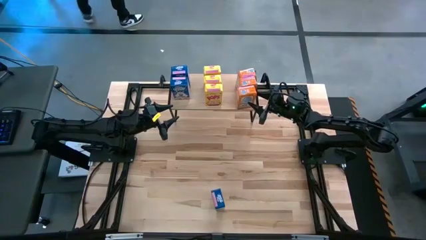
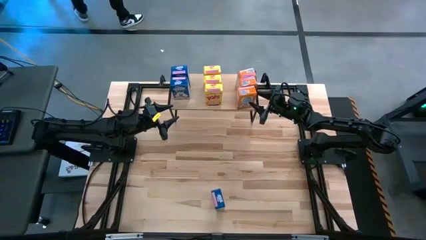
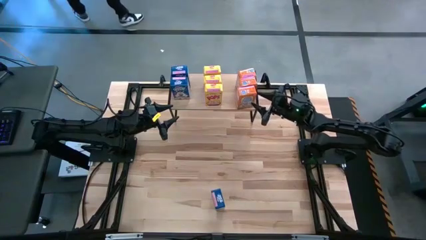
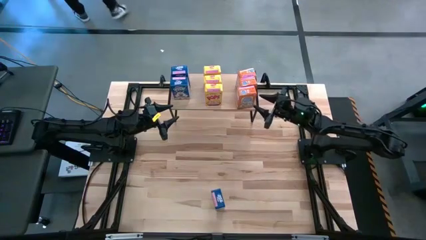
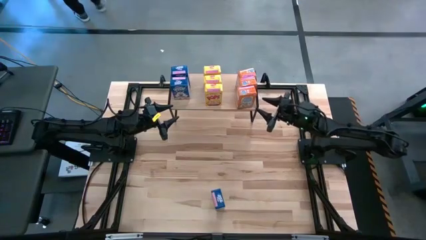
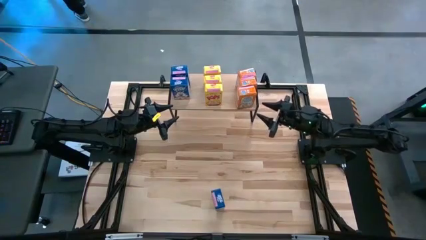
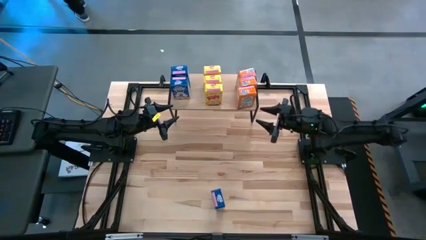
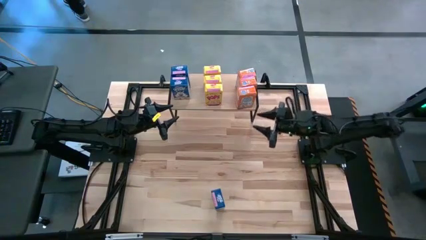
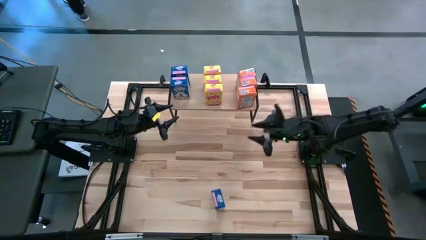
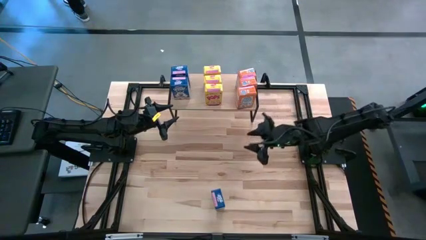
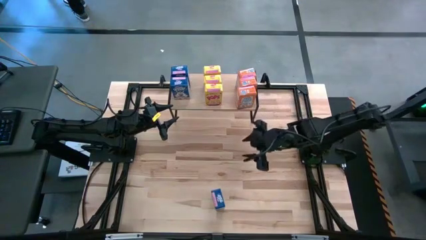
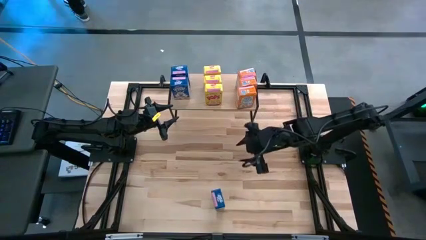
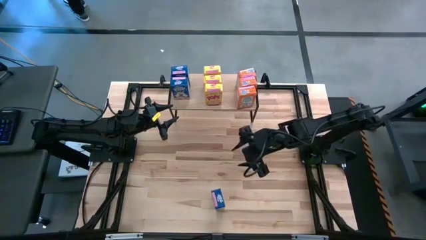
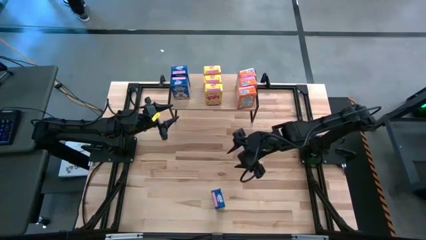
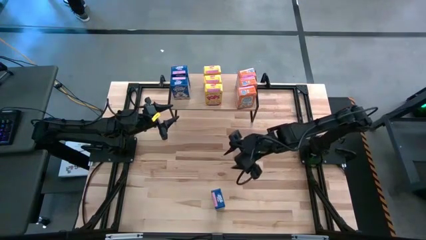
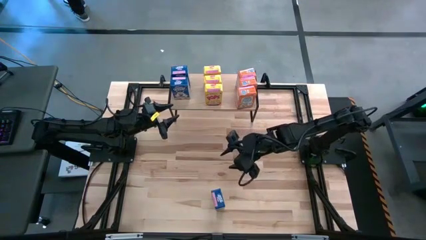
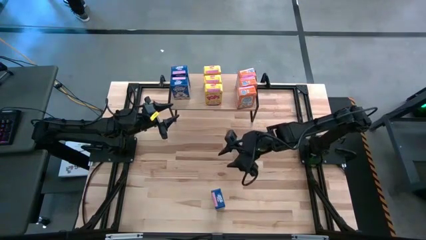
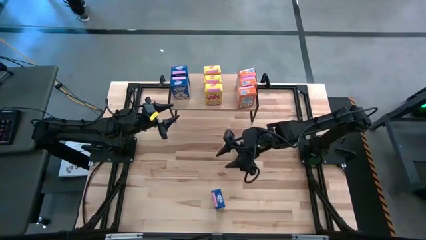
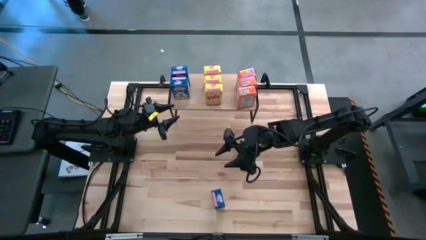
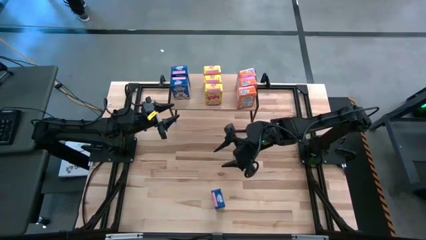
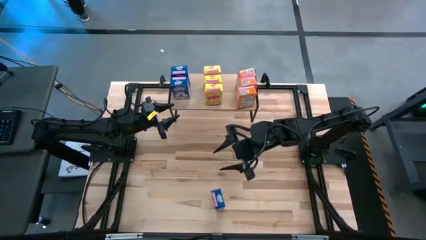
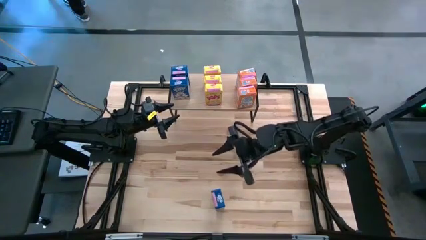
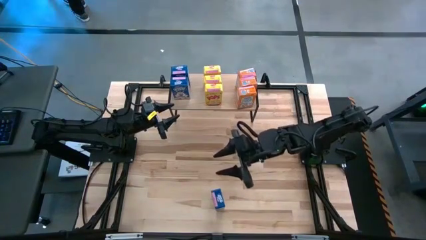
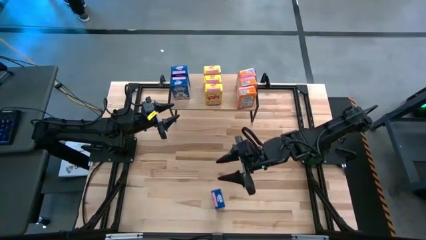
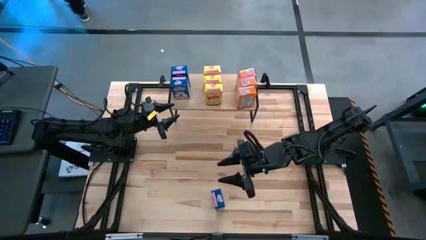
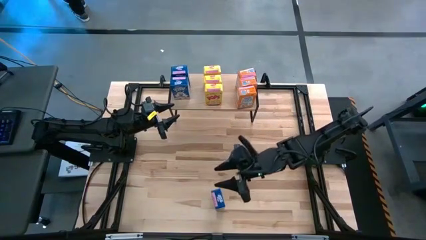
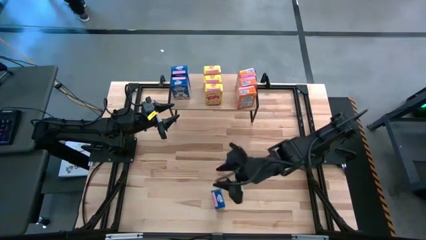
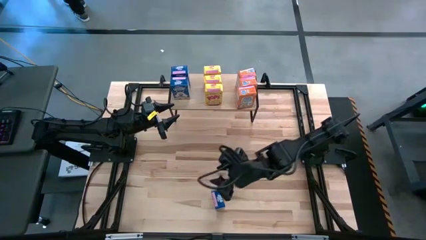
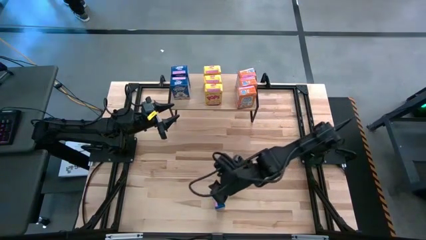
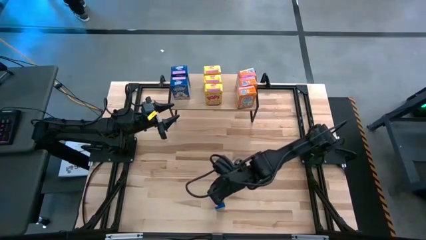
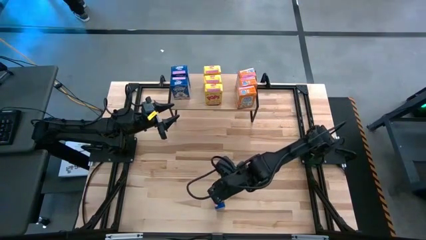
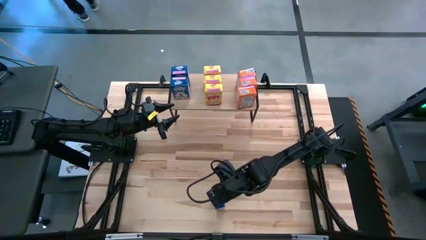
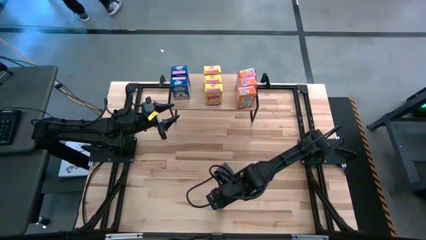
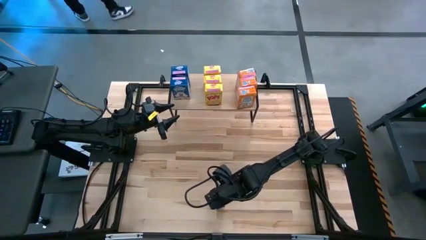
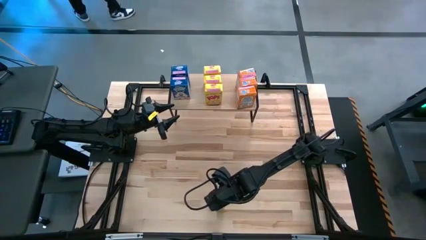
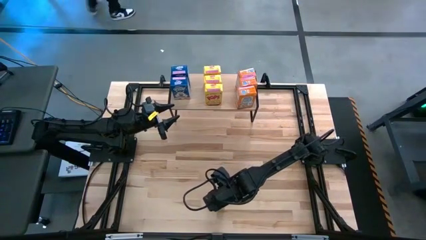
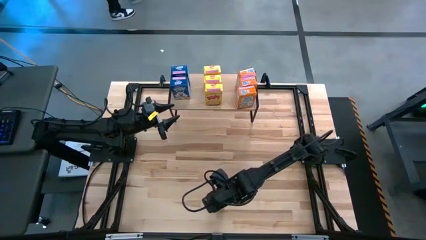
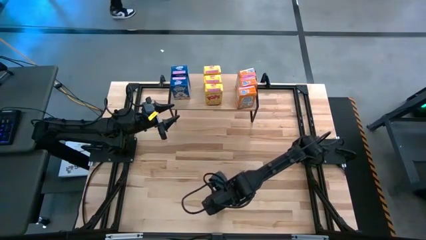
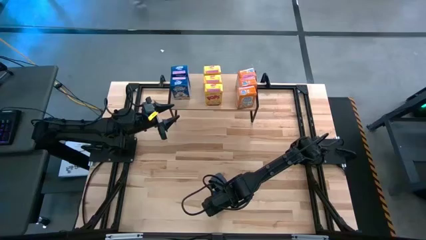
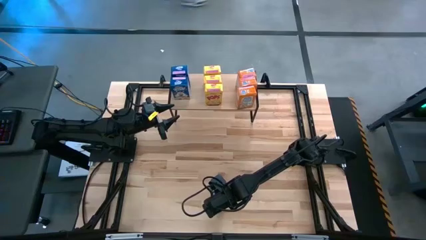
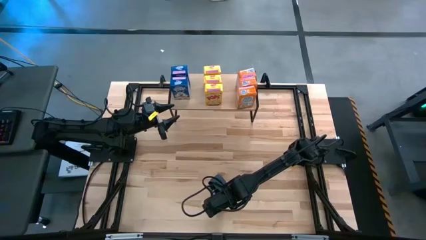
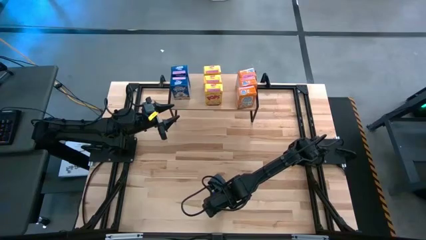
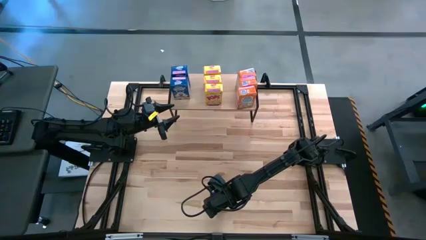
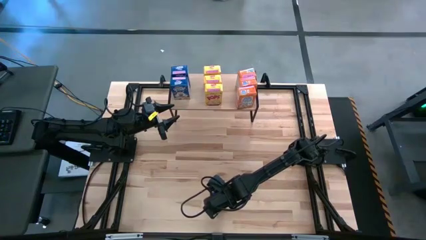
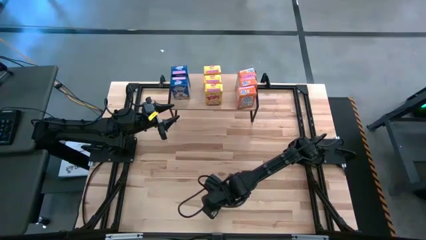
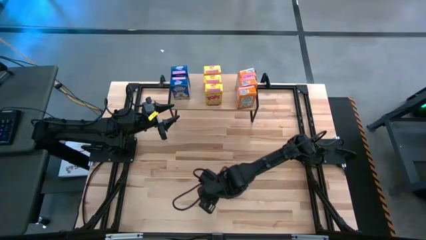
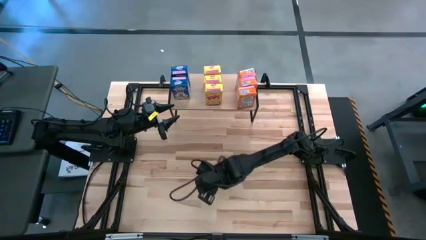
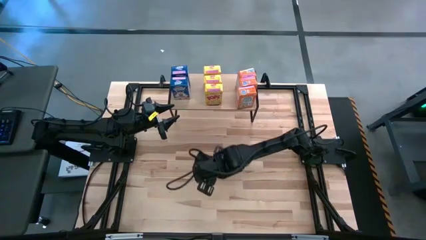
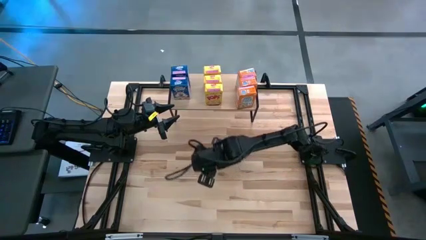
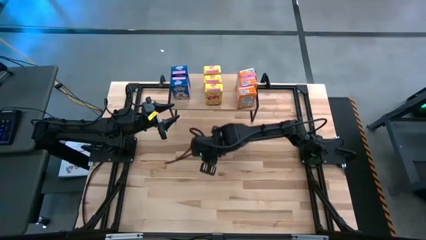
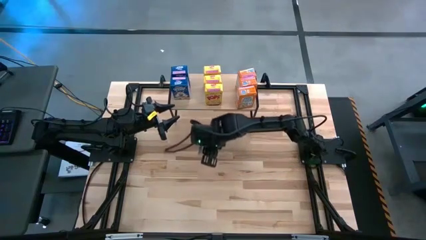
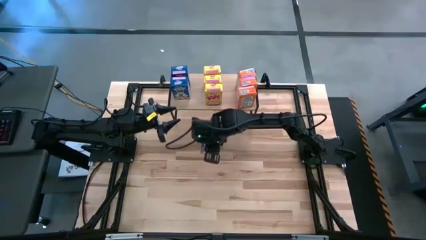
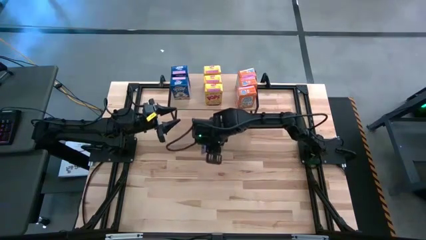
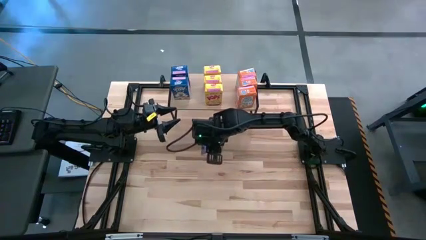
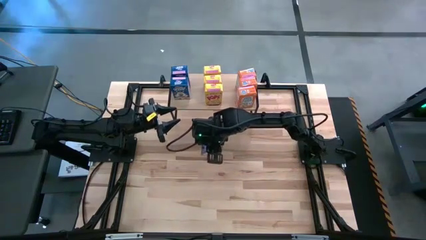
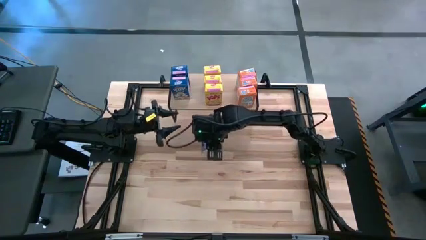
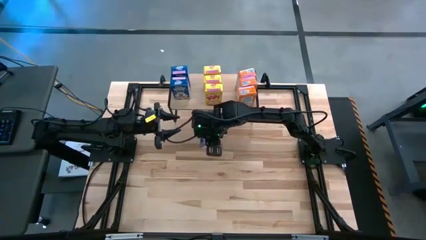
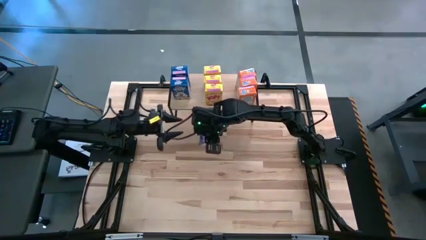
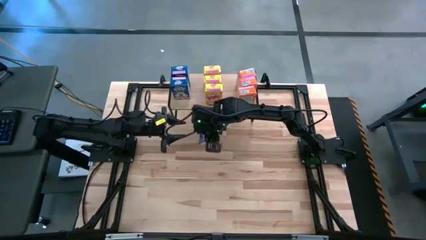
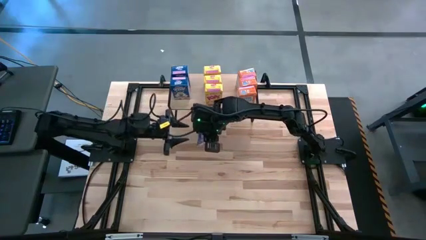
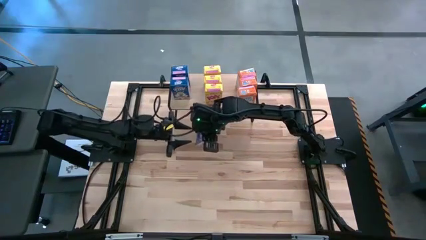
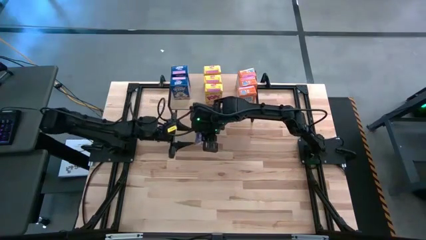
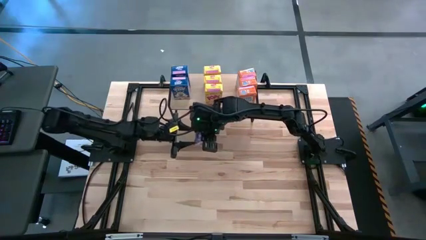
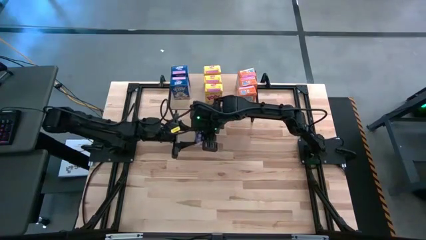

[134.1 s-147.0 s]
Task: Stack cereal on shelf
Put the blue cereal box on the shelf
